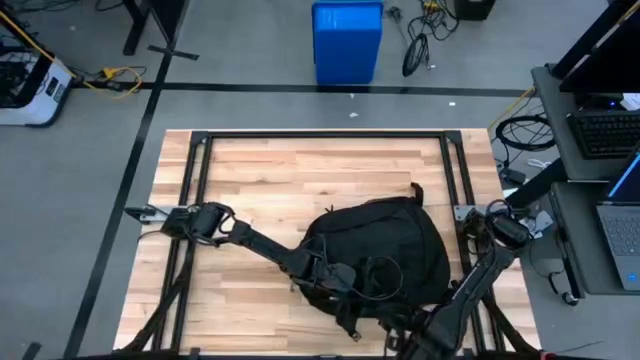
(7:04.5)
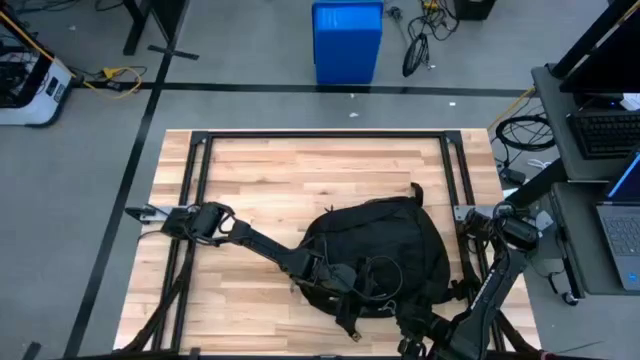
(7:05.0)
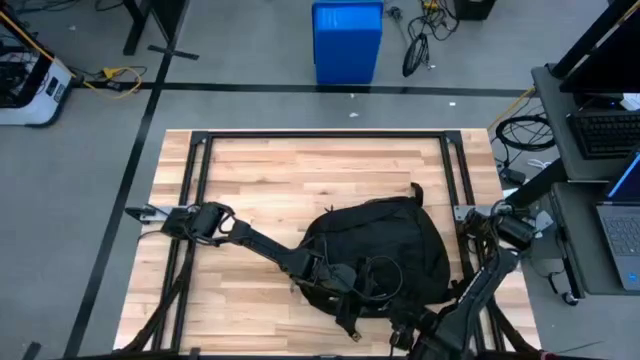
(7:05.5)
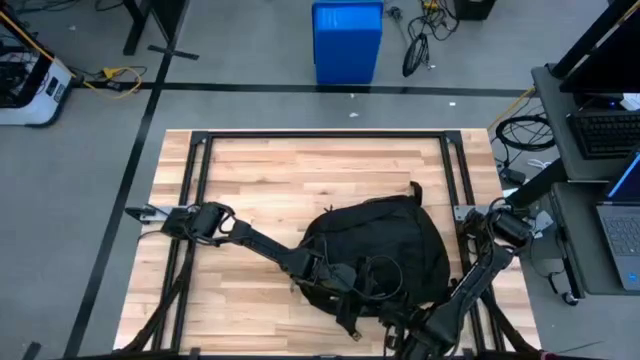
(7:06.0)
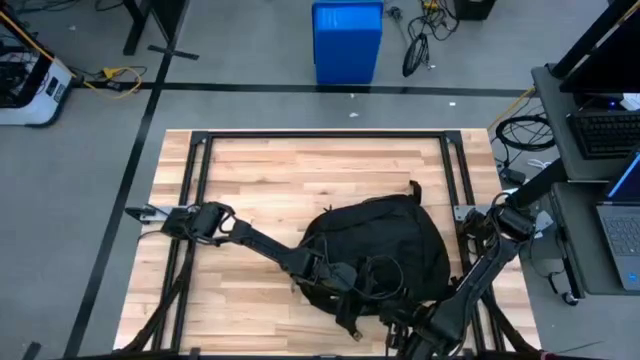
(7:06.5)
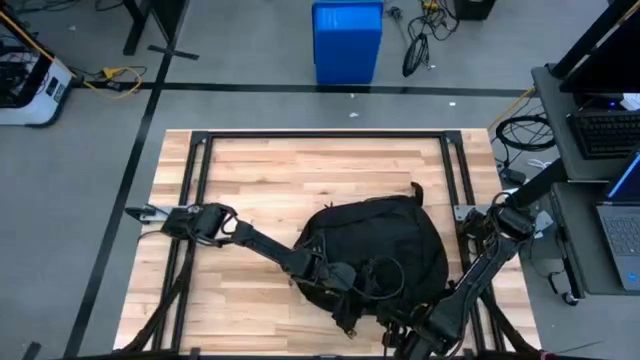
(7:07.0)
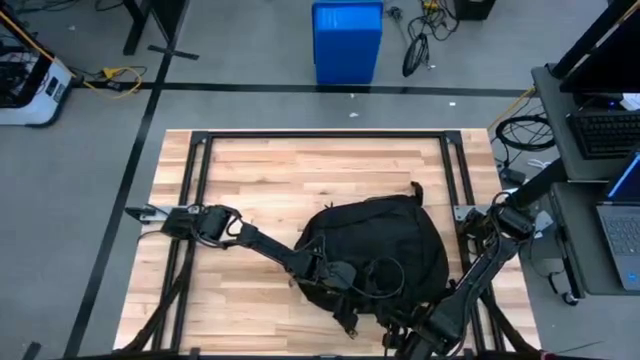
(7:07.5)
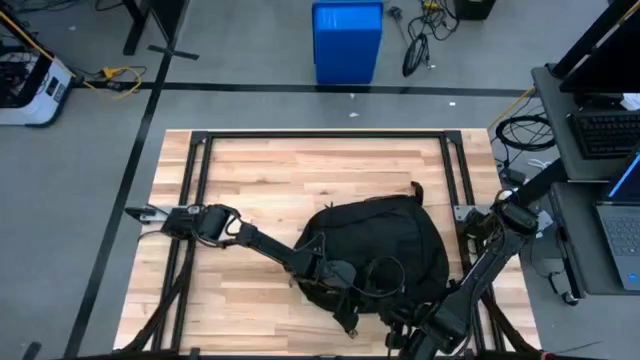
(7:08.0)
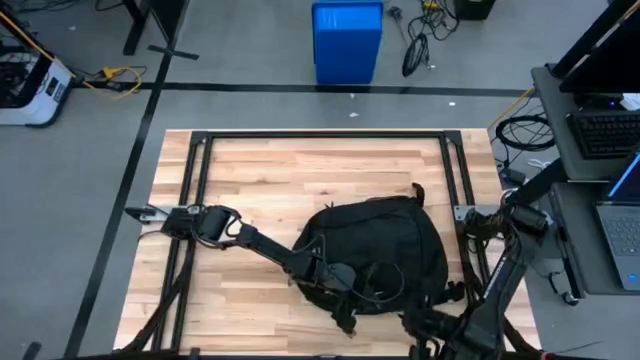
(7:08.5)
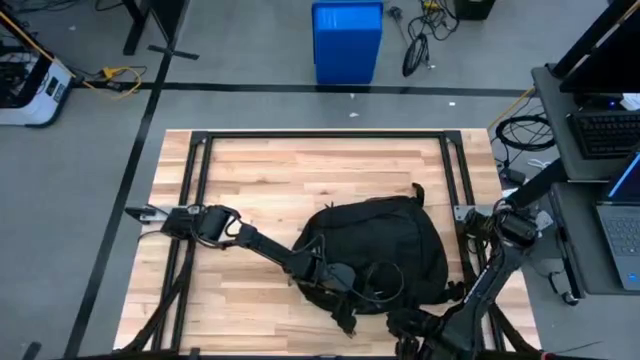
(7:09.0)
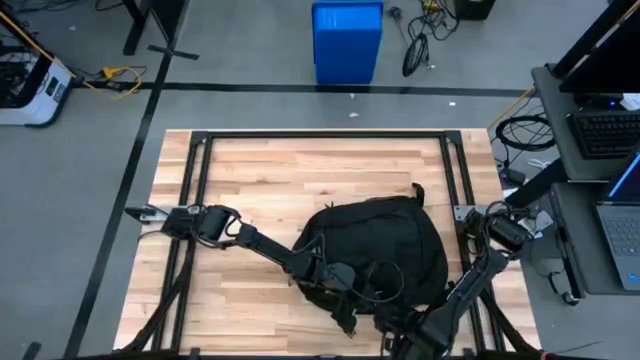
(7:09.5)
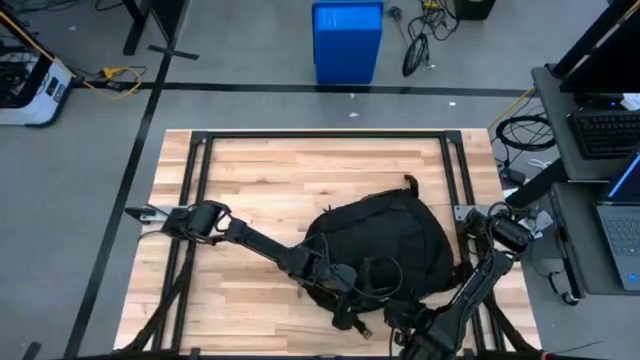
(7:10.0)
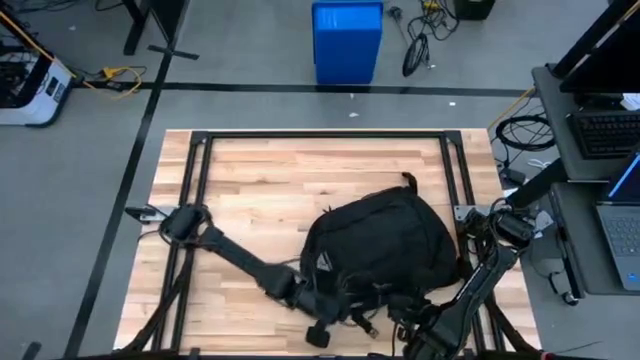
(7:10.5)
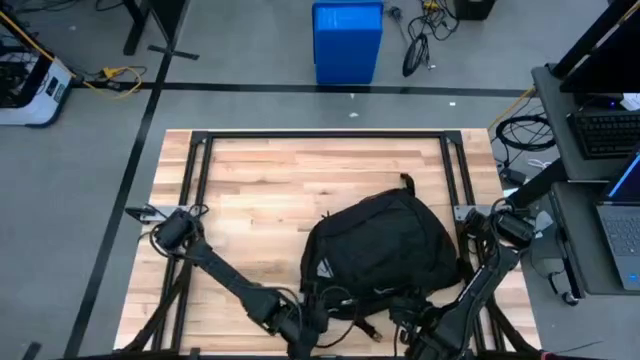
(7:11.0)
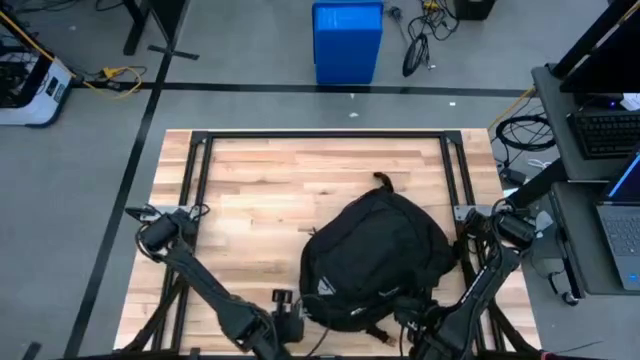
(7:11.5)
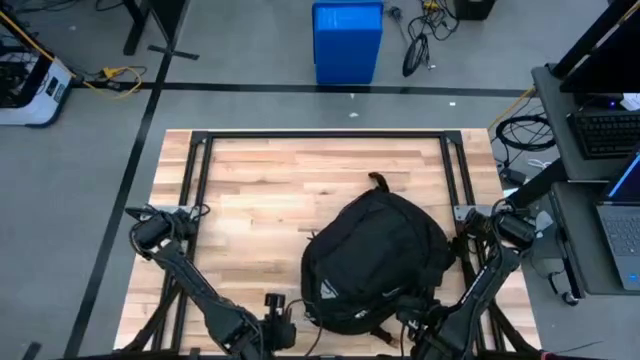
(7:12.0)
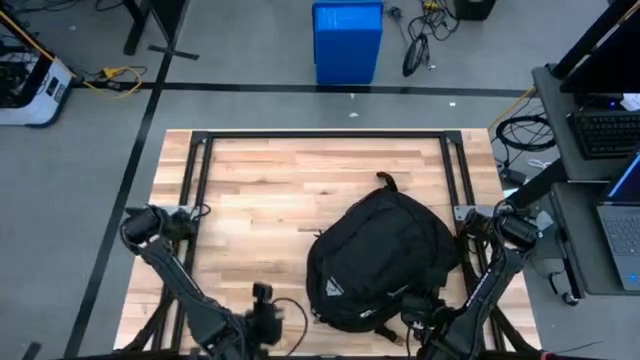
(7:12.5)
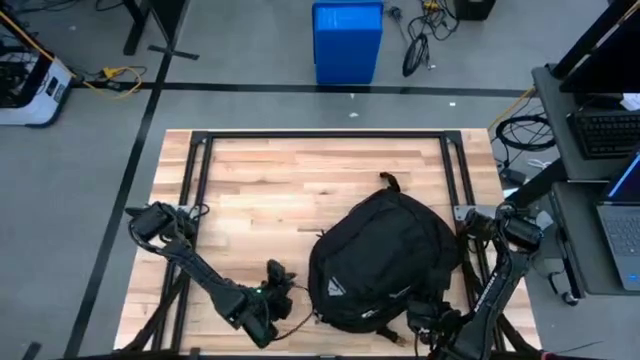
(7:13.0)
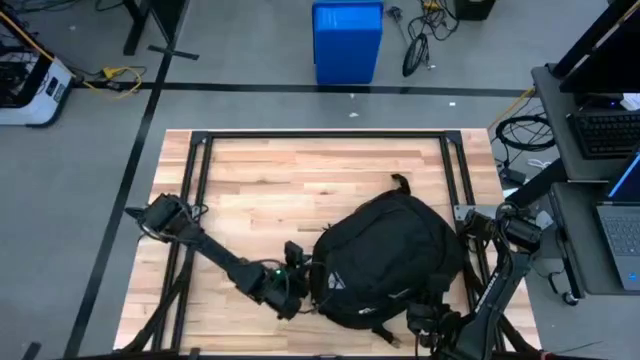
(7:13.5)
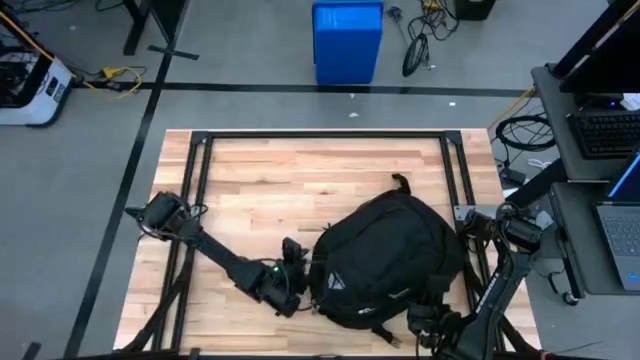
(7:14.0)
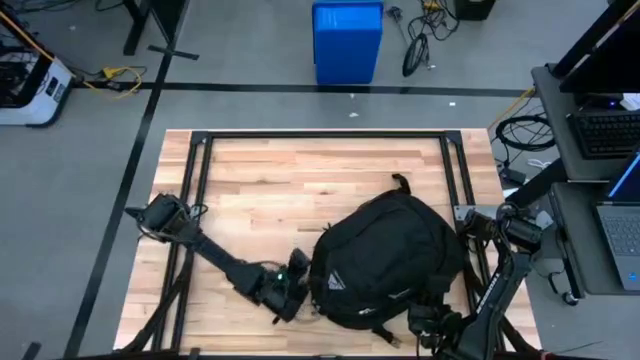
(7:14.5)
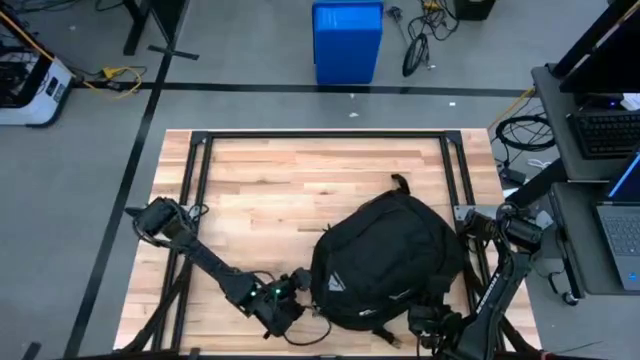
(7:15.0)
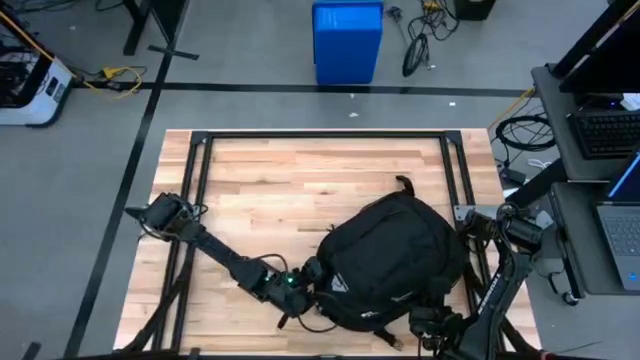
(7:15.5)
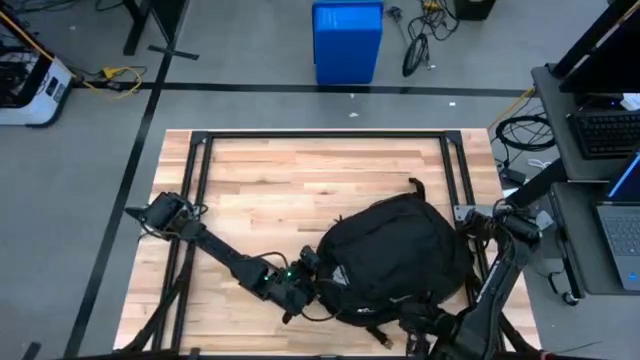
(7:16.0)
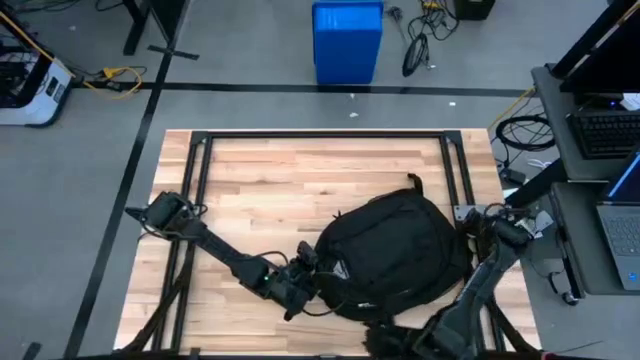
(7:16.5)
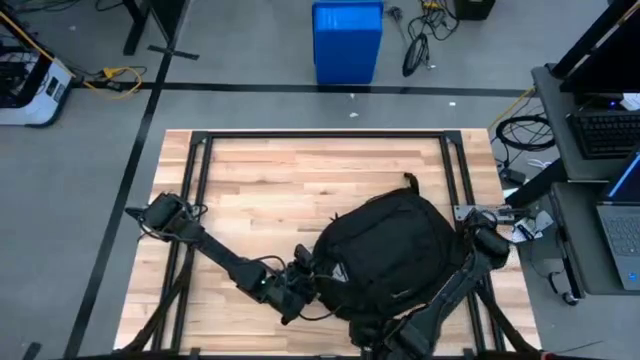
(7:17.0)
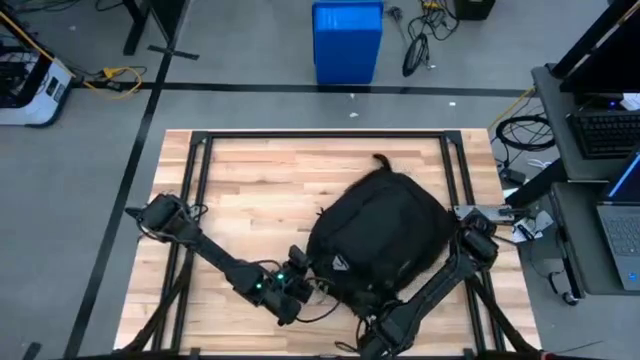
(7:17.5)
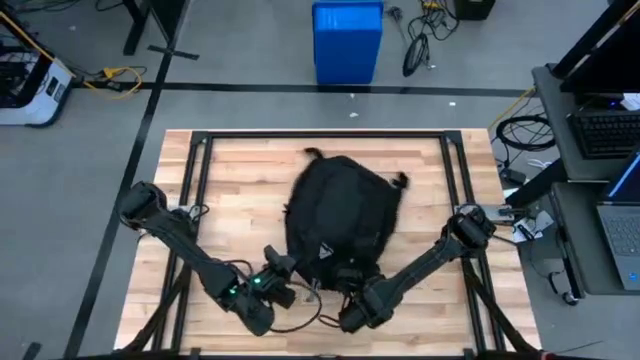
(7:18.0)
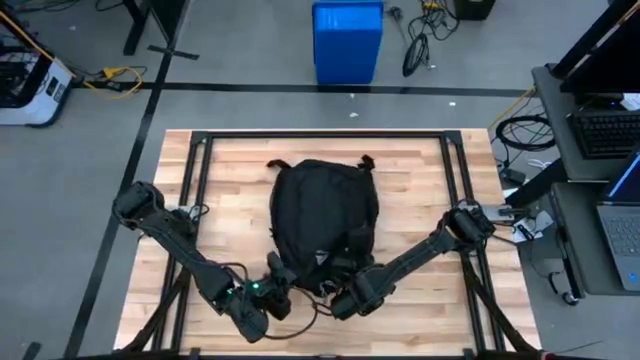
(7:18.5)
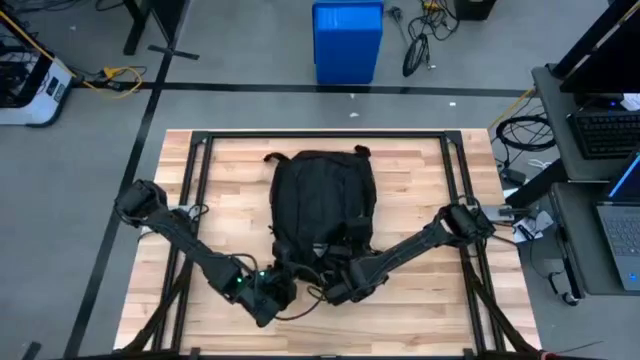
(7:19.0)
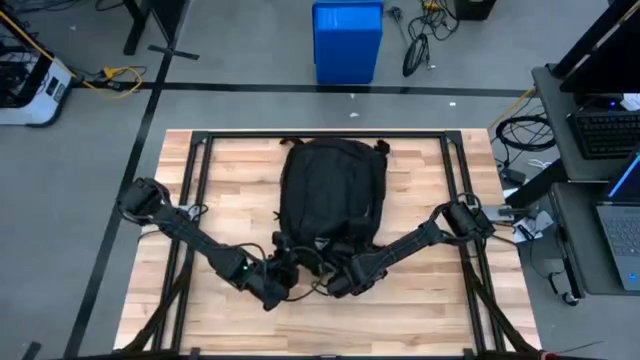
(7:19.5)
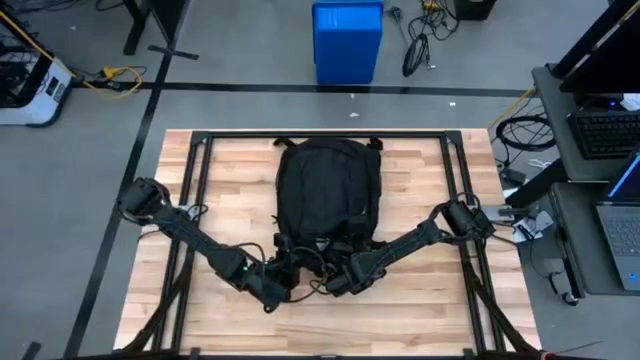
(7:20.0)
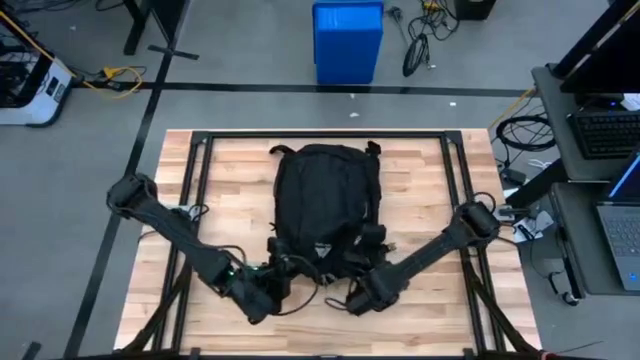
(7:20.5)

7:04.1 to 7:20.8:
Task: Unpack backpack
Close the black backpack

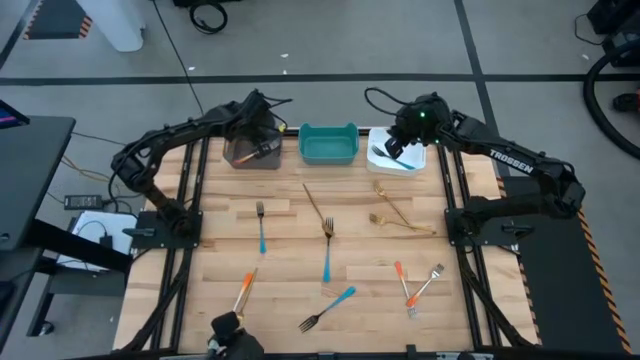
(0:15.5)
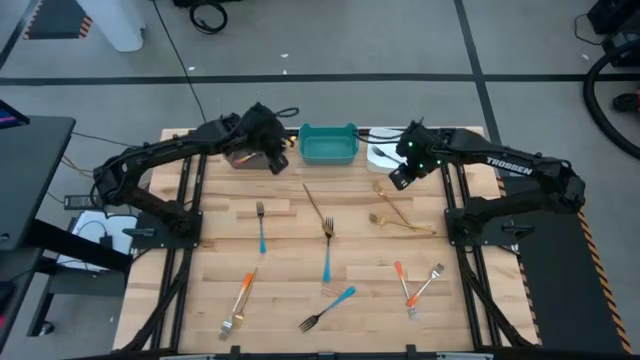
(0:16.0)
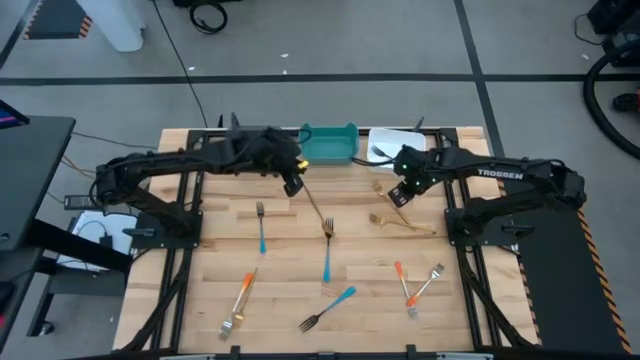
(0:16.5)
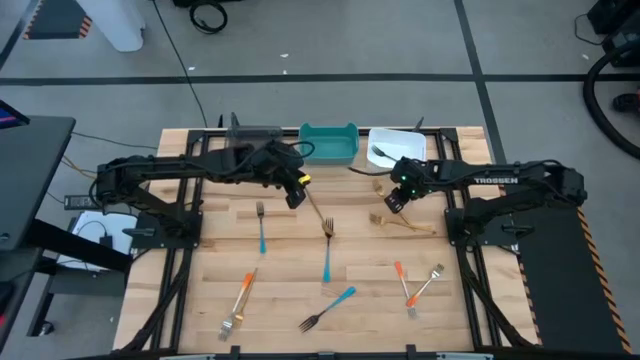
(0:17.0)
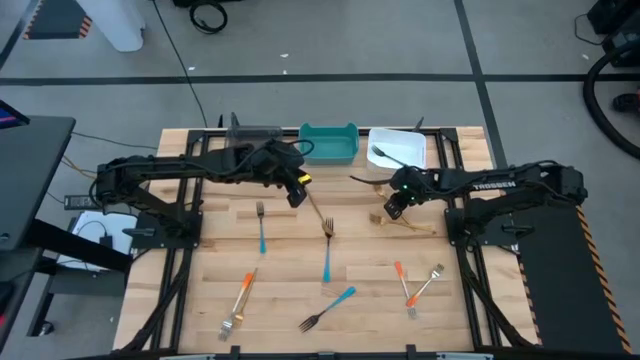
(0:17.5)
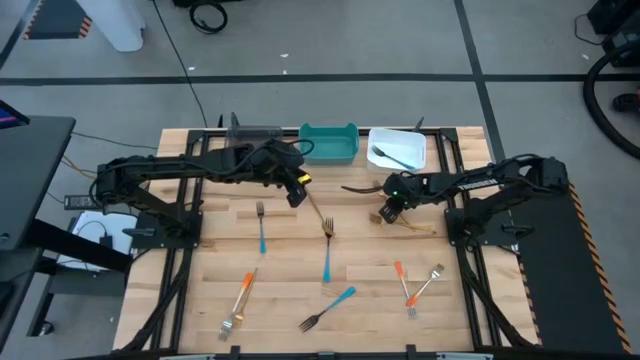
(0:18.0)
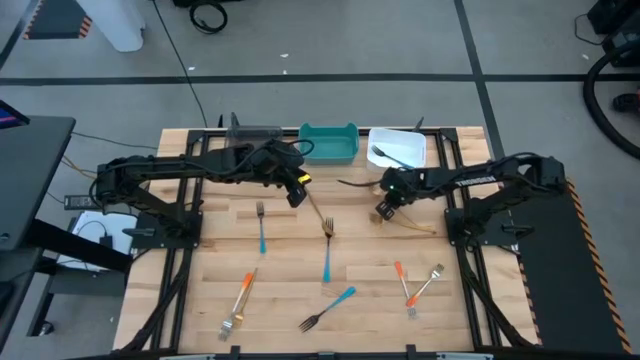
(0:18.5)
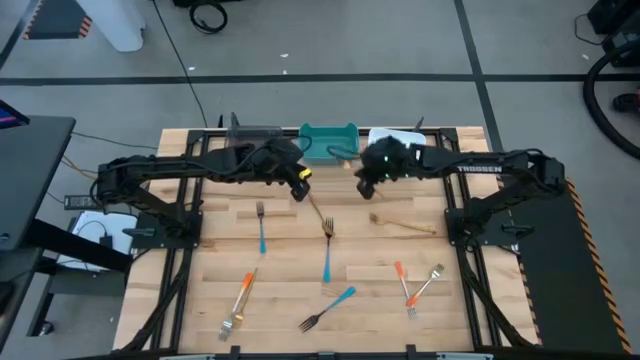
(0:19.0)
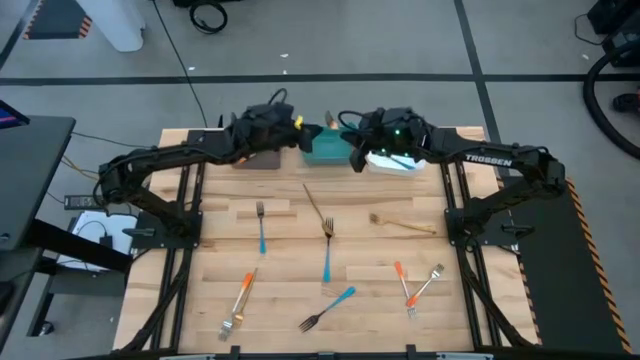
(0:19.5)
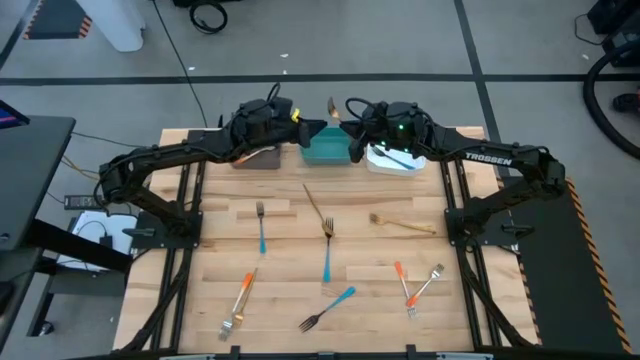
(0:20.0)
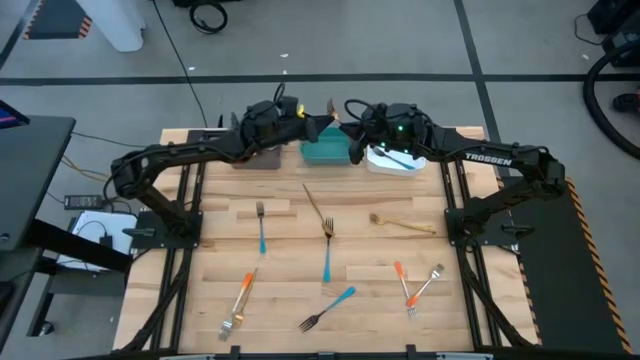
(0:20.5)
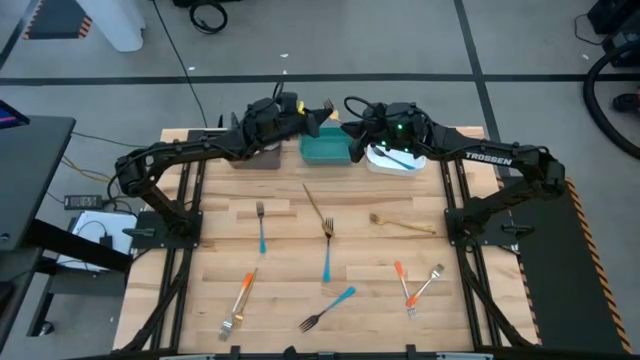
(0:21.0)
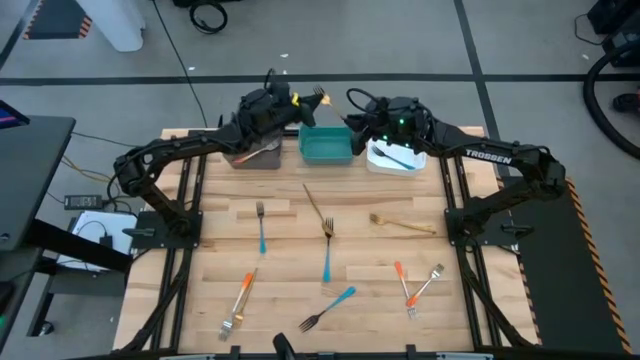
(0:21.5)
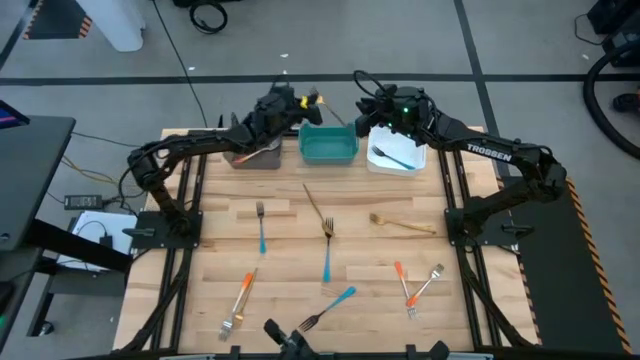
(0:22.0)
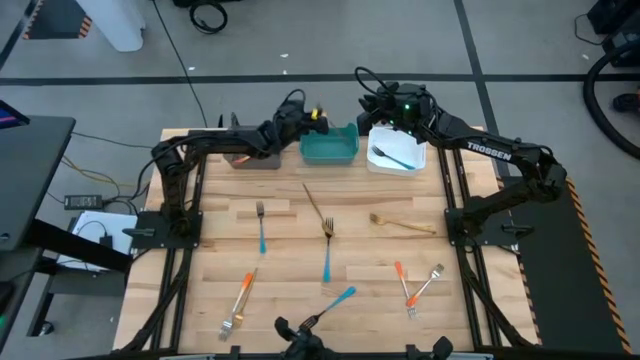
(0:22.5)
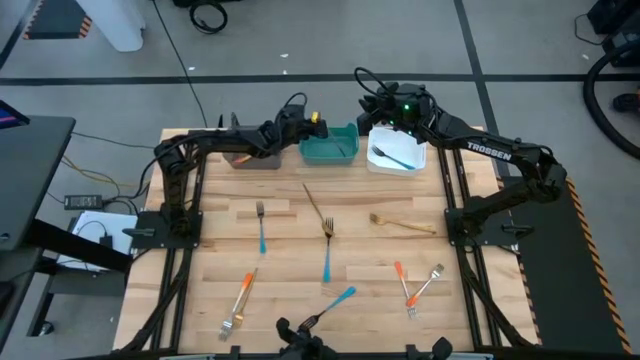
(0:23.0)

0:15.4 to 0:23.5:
Task: Sort silverware by color (type)
Put the top right gold fork into the green bin
